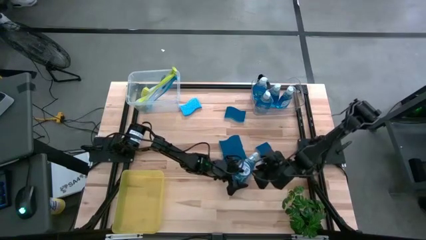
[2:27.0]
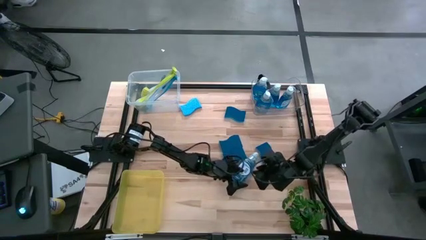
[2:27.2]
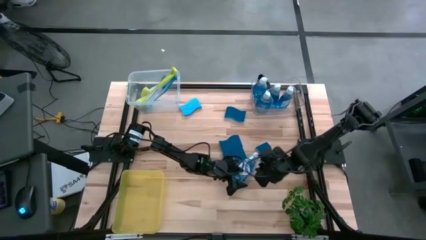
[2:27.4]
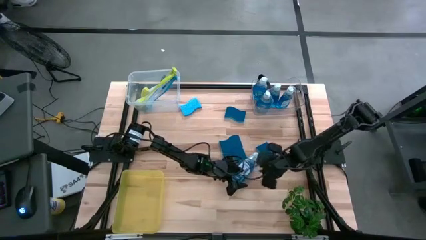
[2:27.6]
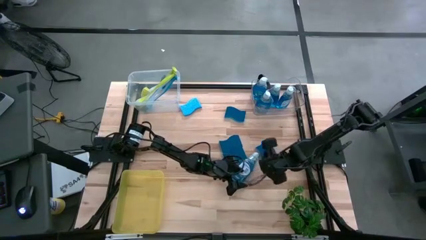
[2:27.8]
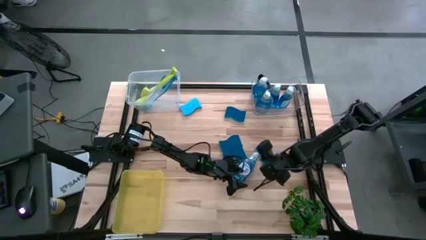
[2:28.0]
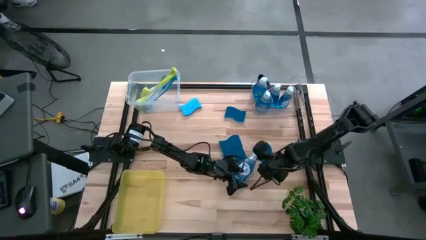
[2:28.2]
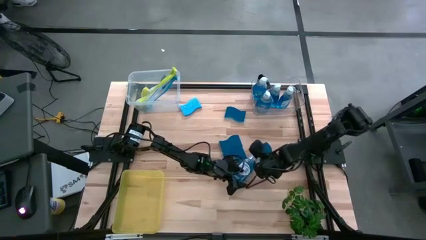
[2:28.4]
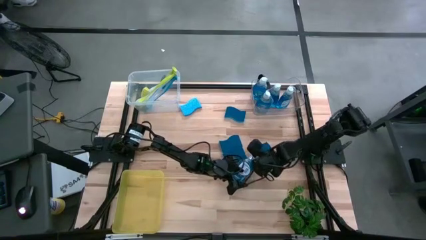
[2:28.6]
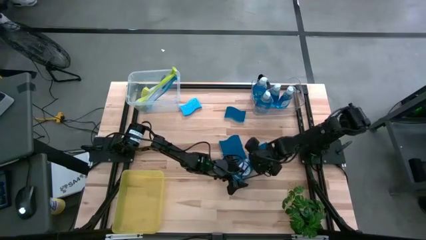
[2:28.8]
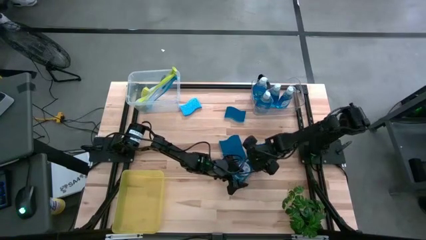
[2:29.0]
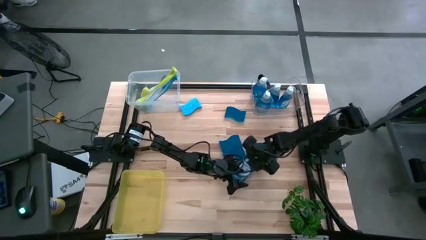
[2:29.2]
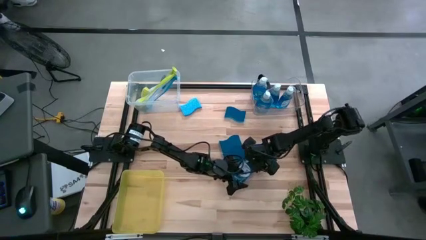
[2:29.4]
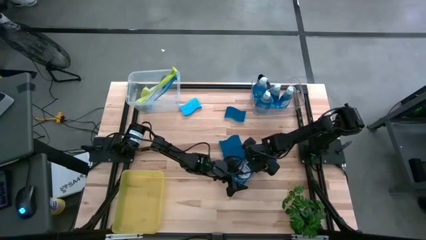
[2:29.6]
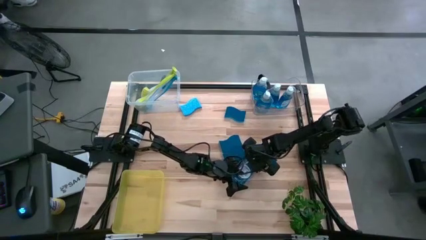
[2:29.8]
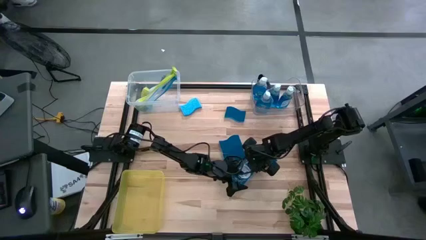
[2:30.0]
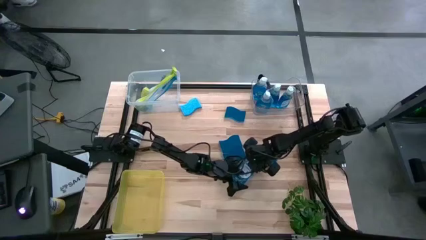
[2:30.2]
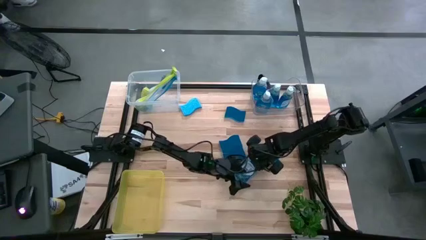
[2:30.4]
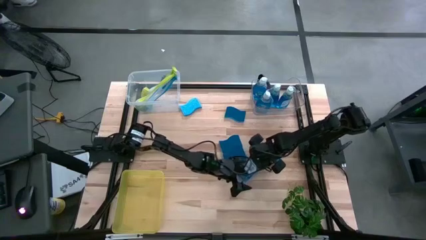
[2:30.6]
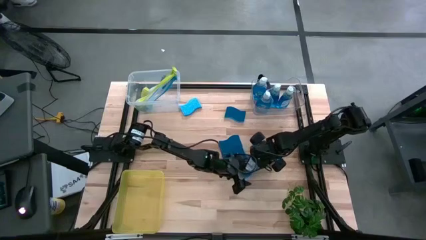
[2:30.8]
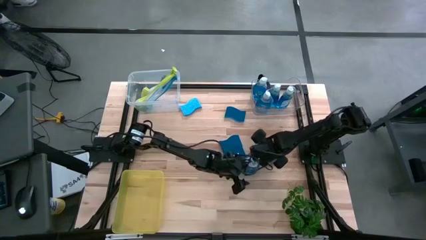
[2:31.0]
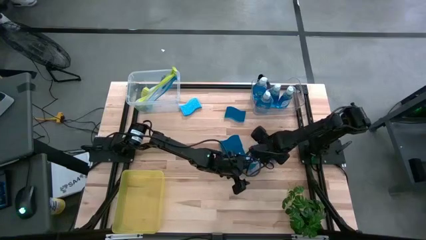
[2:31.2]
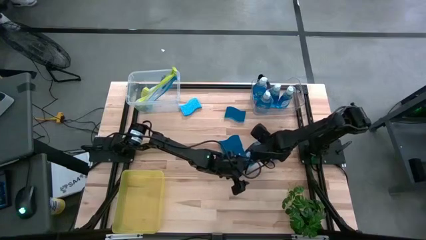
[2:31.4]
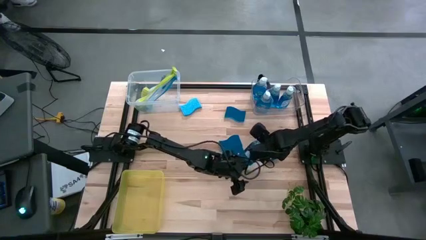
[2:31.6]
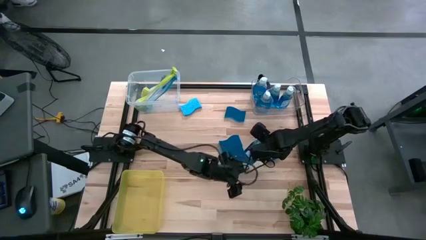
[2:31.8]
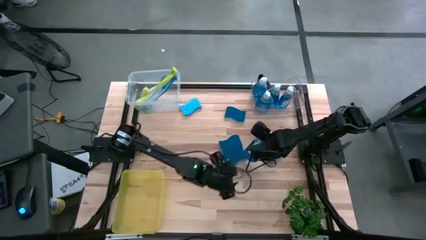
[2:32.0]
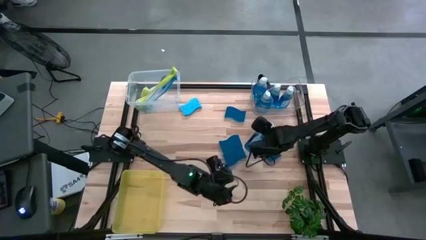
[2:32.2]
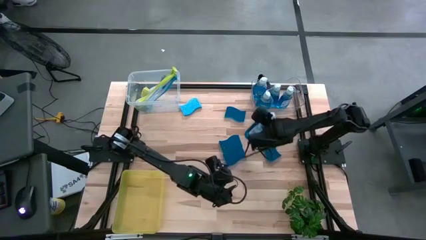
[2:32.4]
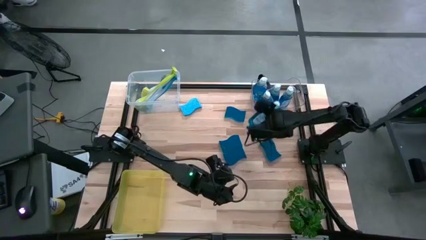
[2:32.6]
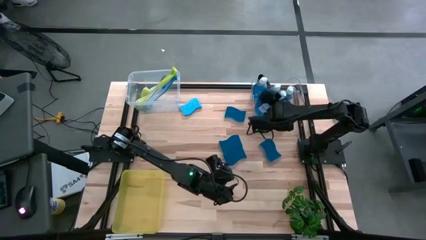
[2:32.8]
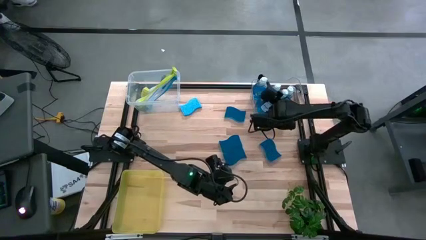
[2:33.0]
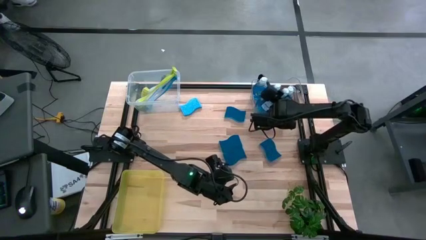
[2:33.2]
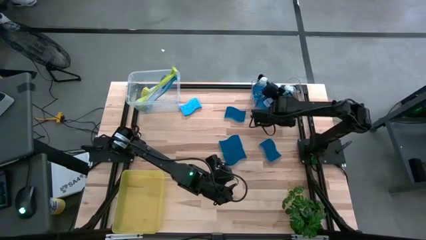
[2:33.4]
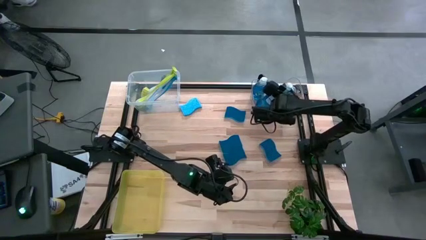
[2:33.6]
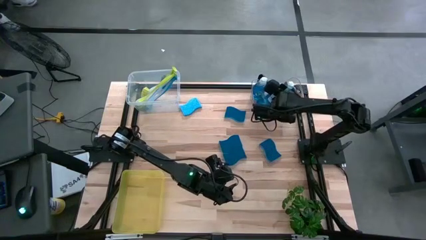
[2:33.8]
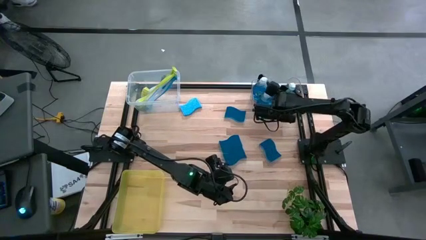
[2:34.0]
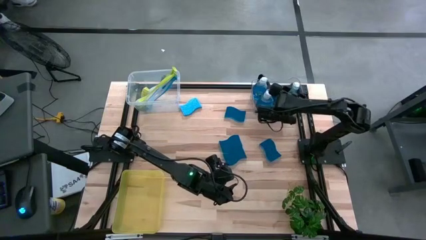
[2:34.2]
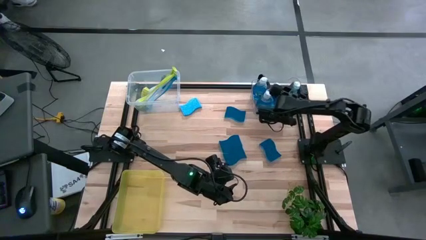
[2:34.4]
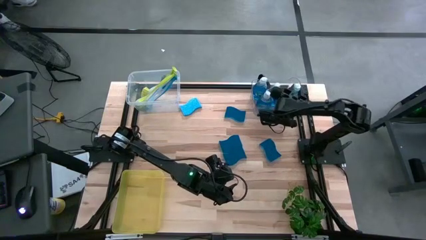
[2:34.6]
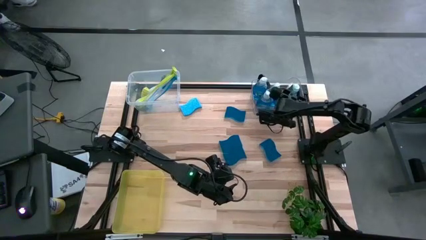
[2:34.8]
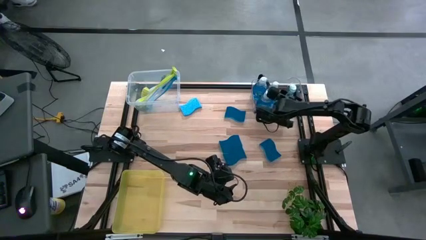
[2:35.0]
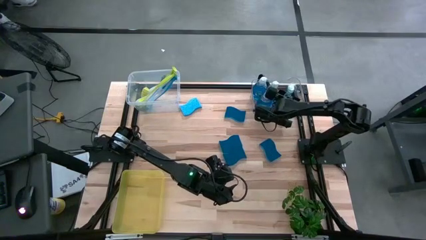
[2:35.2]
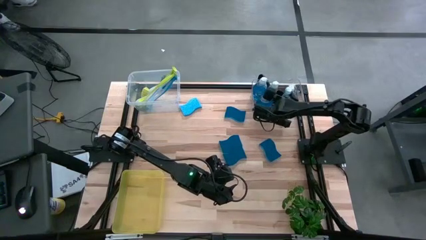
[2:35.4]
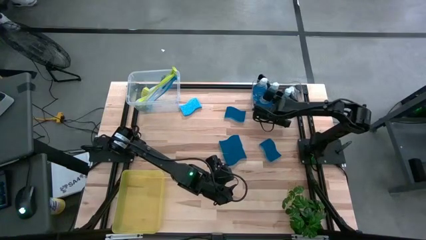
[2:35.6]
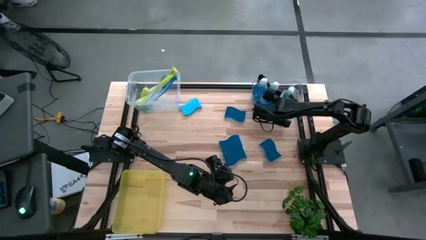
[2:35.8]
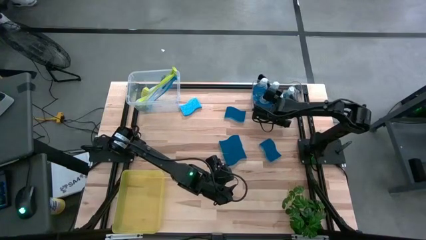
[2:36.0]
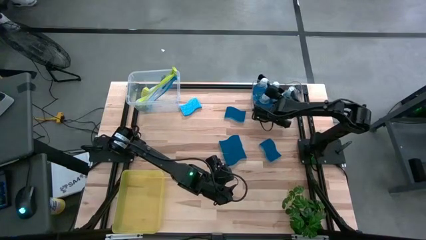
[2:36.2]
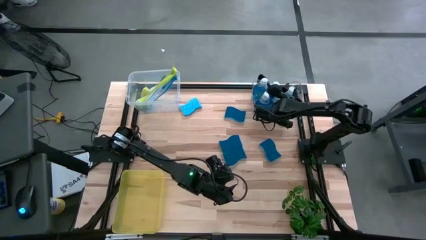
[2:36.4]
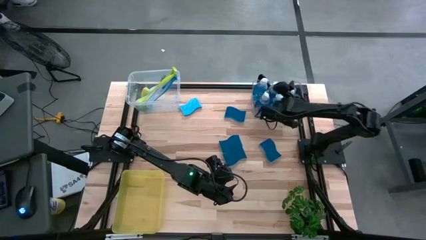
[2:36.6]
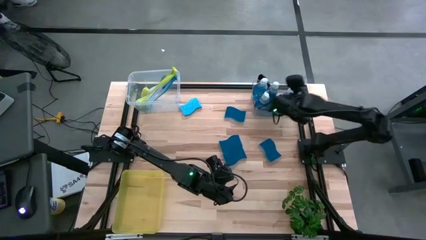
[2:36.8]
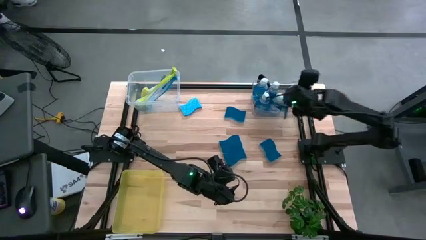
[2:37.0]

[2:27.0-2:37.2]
Task: Pick & Place Kitchen Sink Supplies
Put the soap dispenser into the transparent bin

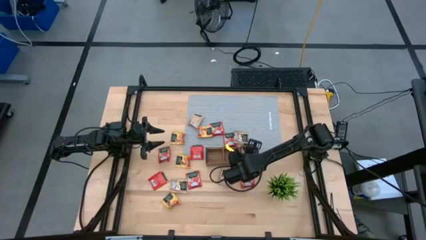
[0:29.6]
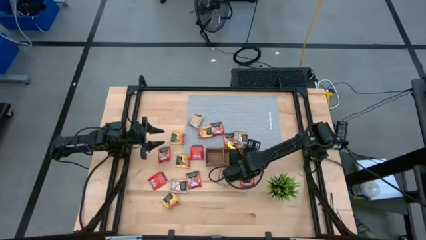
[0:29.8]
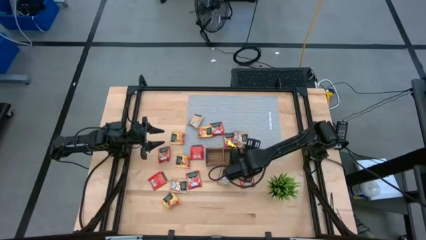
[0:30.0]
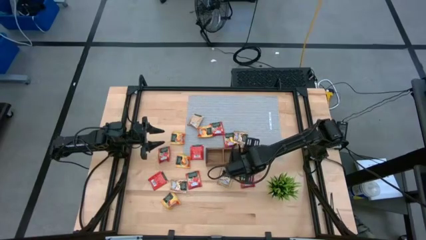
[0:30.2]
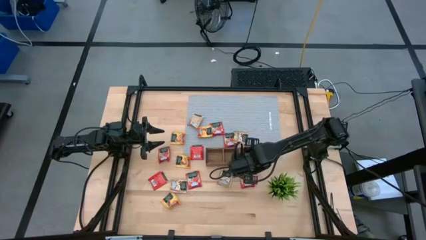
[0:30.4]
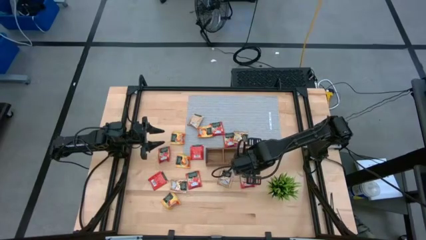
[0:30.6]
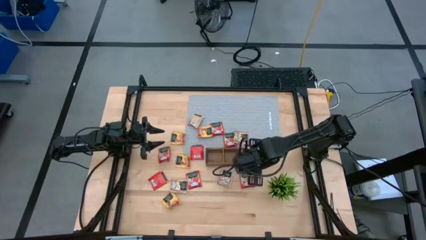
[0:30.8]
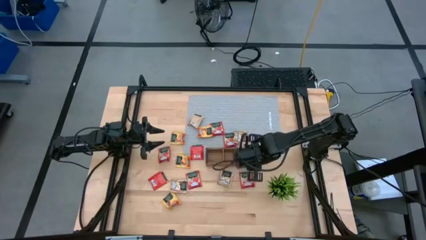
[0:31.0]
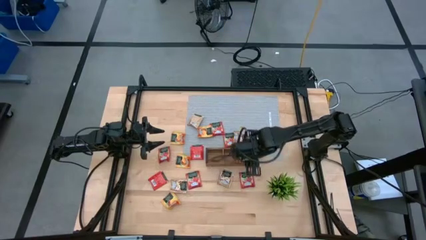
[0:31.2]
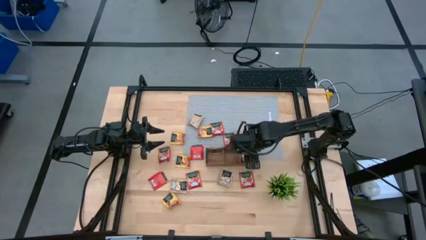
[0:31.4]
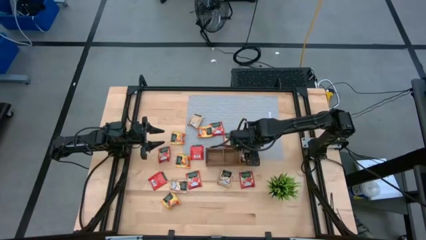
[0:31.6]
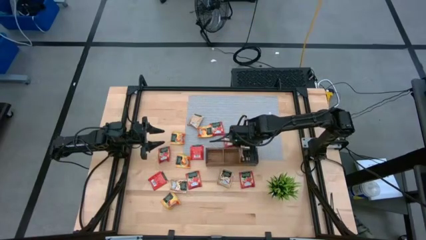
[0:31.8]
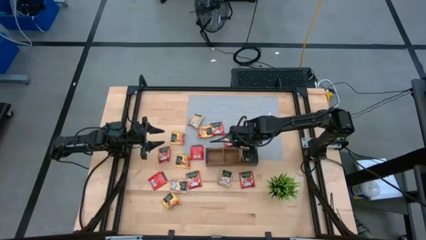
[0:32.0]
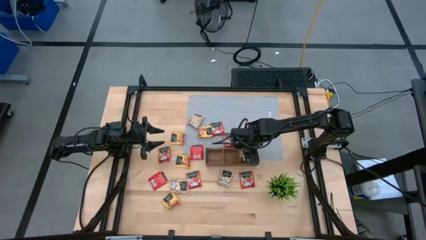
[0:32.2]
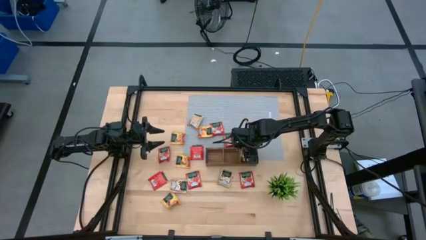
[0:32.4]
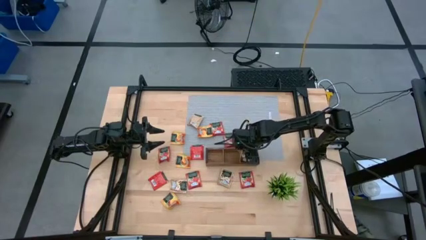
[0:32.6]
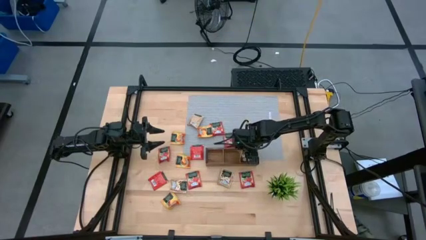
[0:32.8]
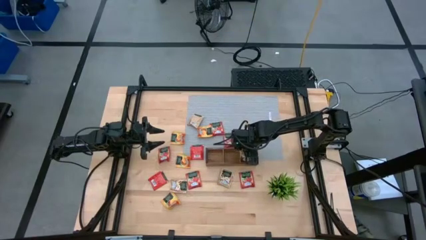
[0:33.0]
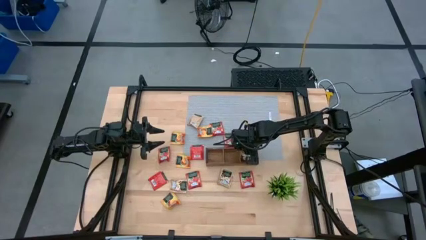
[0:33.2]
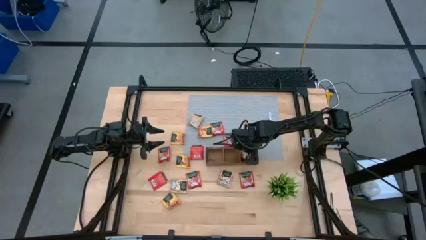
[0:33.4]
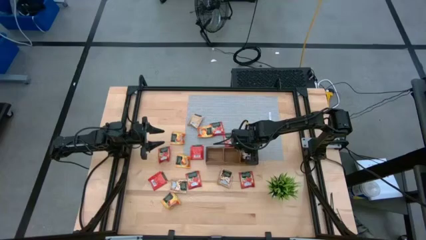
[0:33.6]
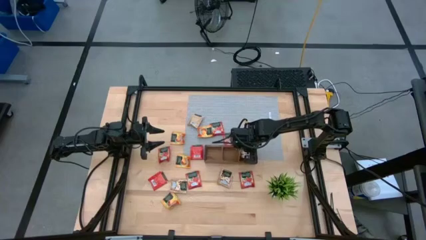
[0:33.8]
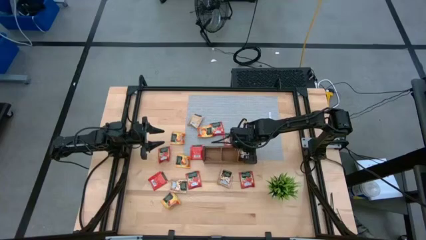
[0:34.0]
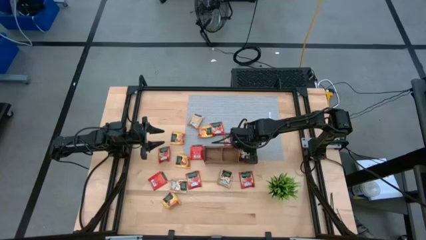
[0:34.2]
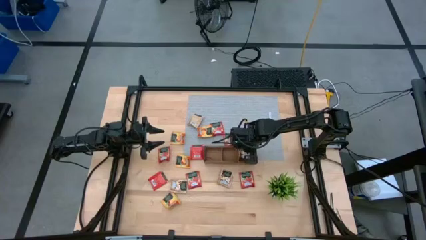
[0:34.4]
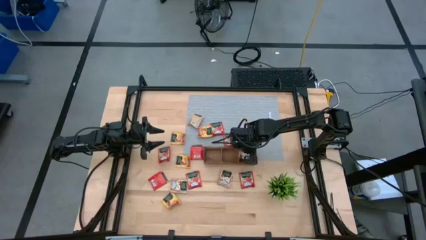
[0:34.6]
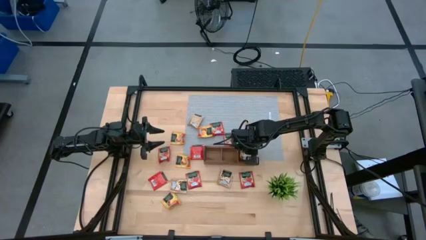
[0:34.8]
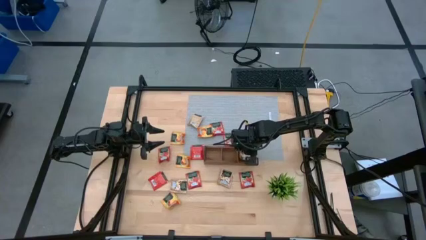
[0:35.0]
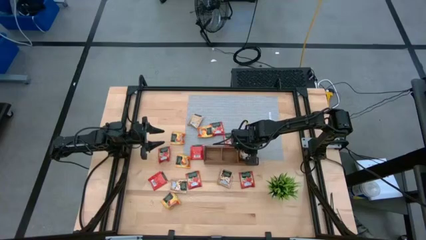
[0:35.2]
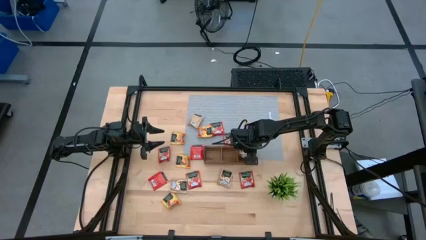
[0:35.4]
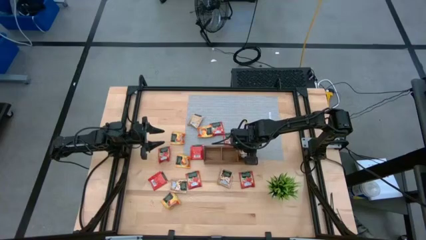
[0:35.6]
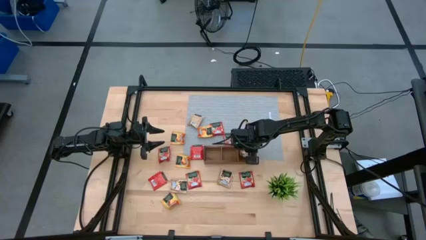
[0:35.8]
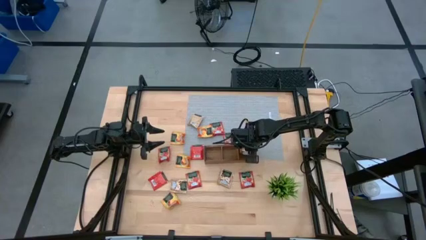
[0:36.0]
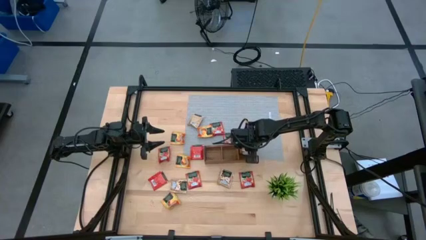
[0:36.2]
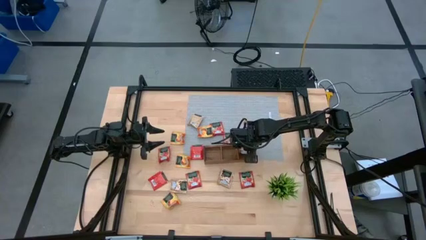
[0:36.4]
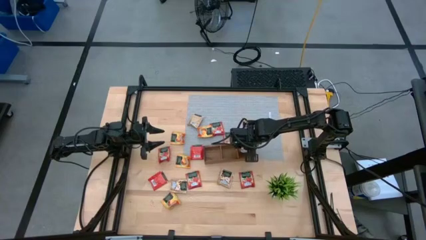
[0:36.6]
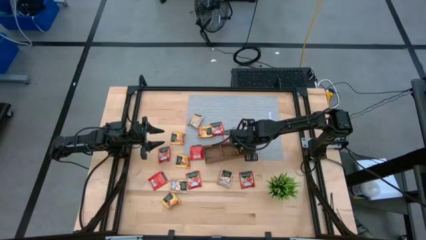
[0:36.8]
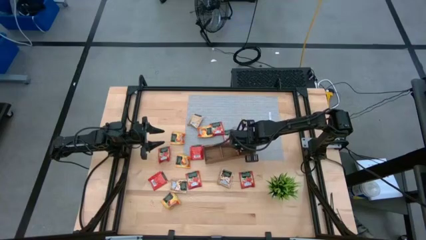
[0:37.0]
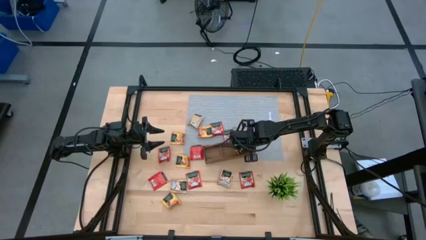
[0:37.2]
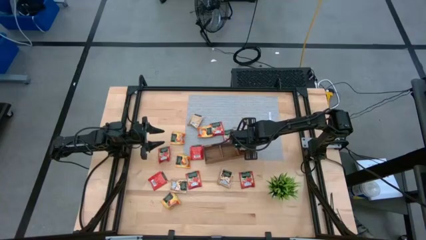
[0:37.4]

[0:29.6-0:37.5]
Task: Pick & Place Tea
Adjust the brown tea bags in the wooden organizer
